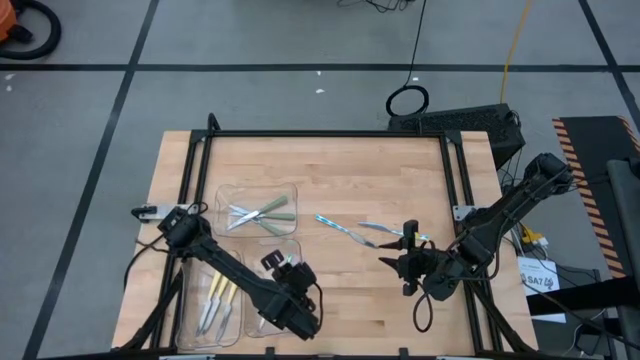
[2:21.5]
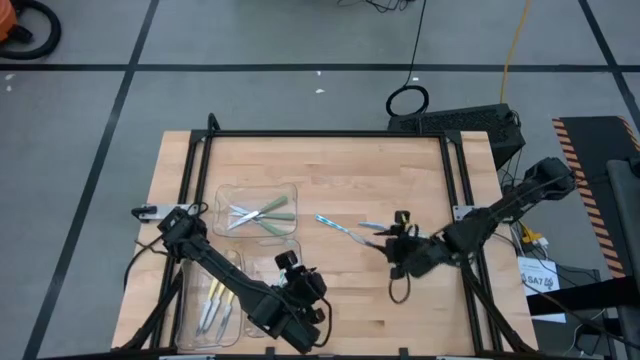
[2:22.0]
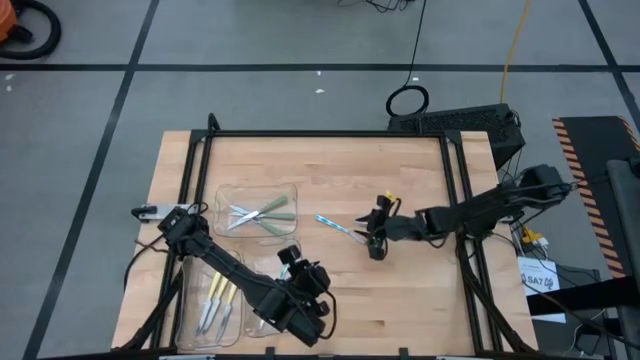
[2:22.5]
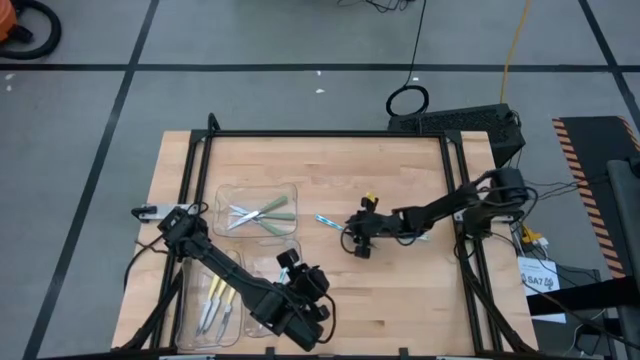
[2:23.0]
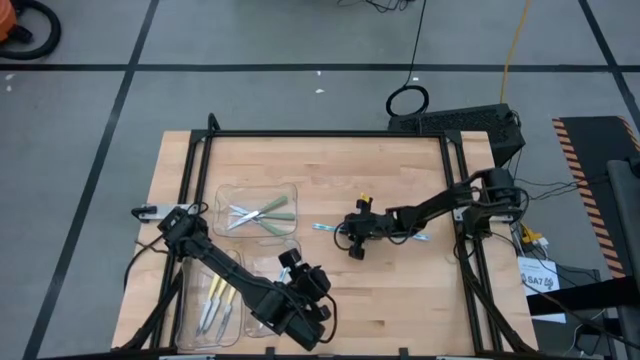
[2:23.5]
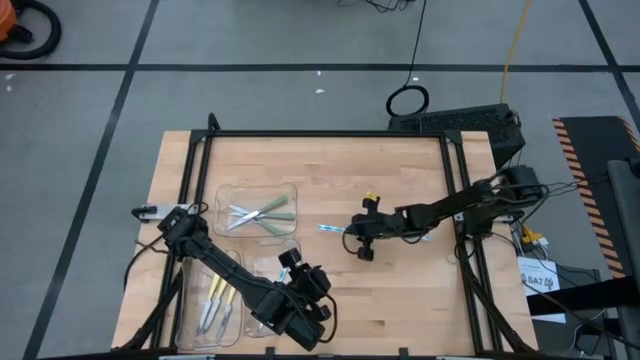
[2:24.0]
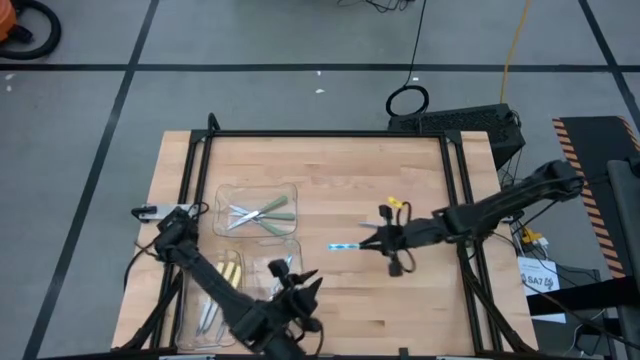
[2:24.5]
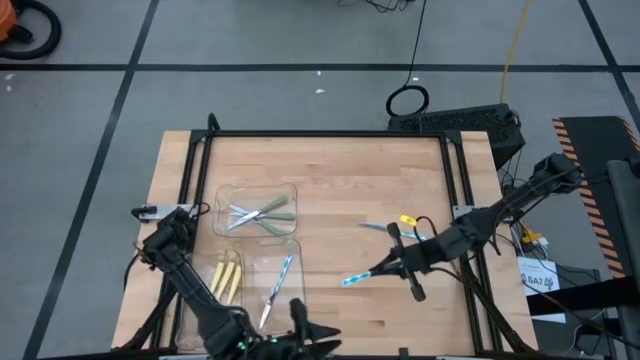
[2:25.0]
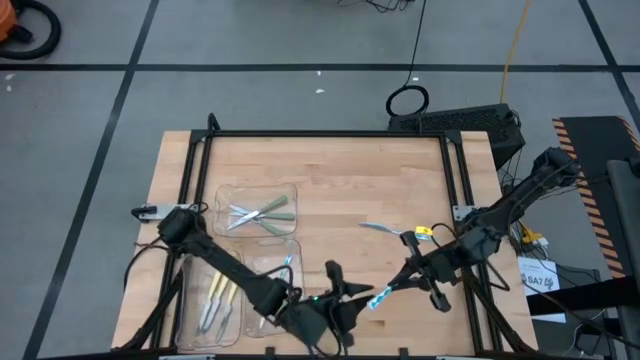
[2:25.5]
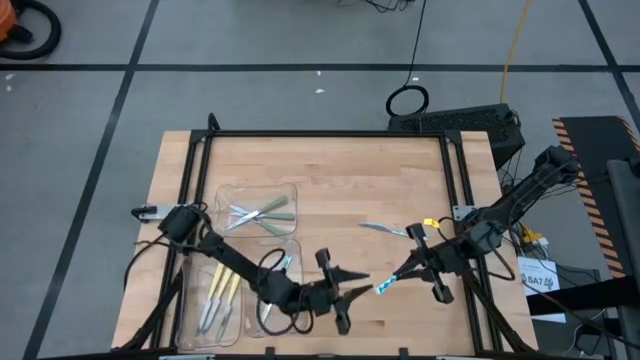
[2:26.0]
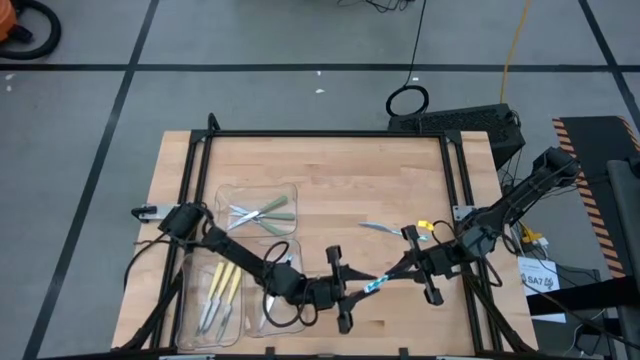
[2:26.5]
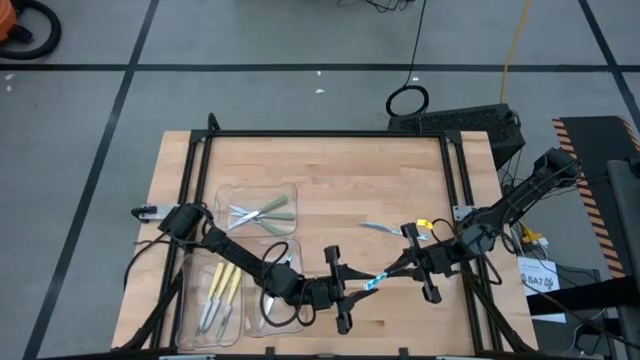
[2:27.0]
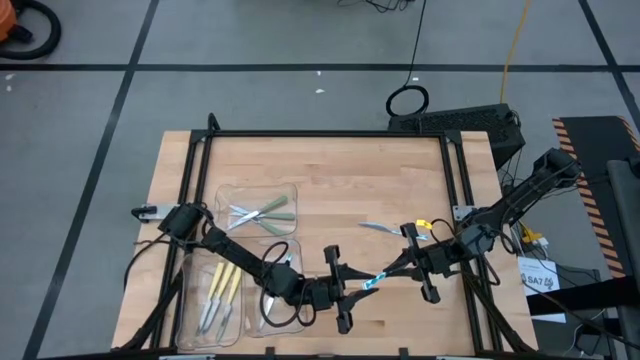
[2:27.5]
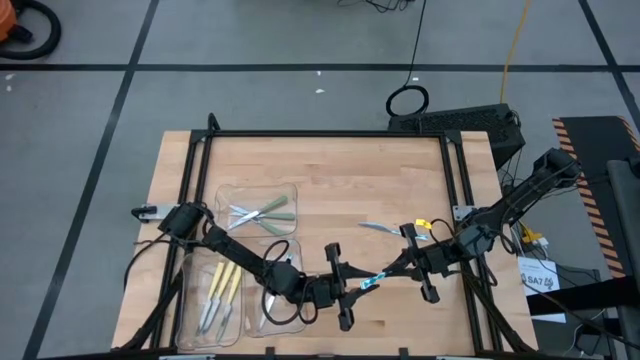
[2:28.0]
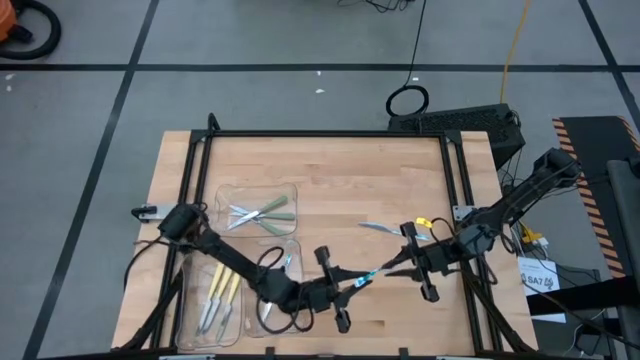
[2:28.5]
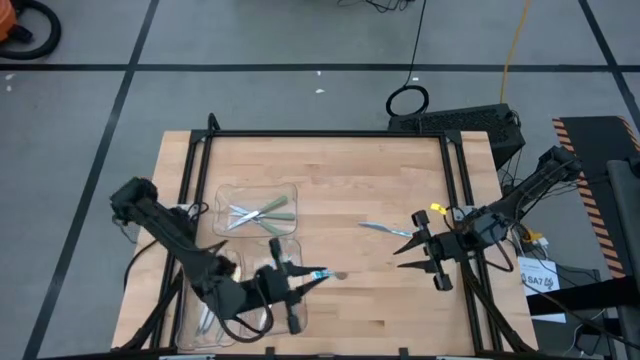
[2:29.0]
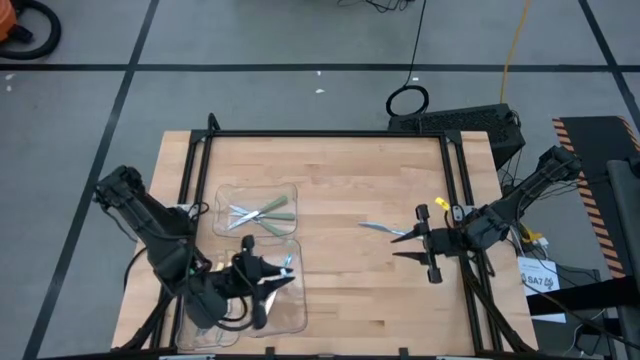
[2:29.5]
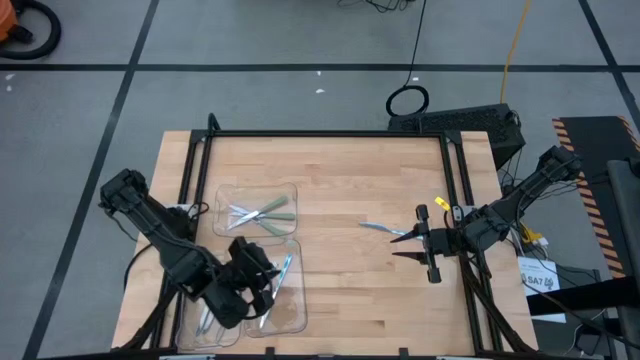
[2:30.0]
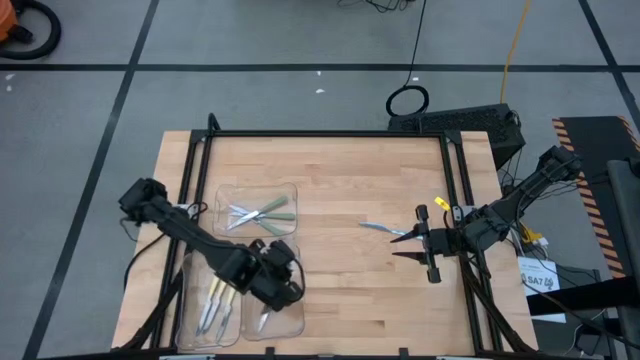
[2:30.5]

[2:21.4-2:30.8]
Task: Sort silverware by color (type)
Put the left blue table knife into the bottom right transparent bin

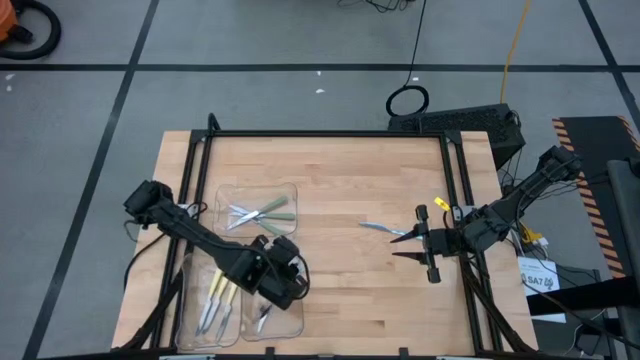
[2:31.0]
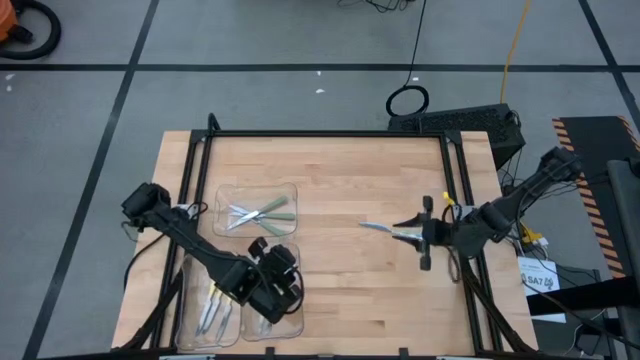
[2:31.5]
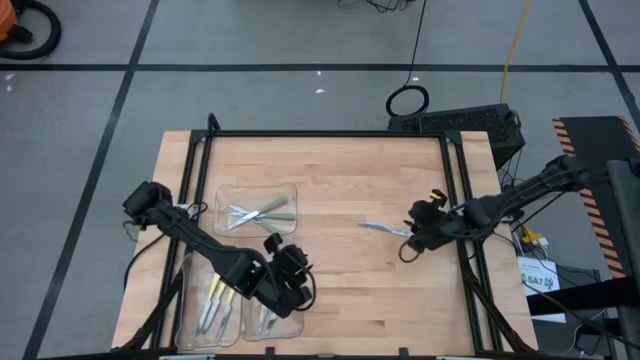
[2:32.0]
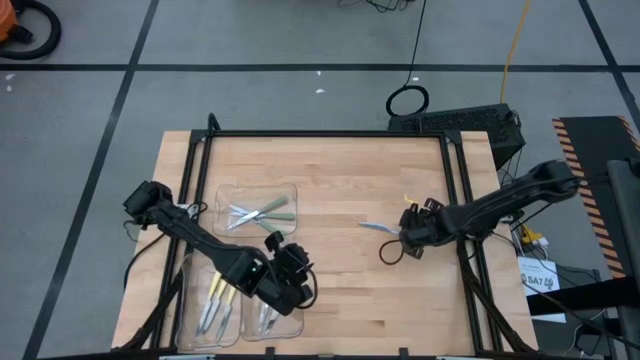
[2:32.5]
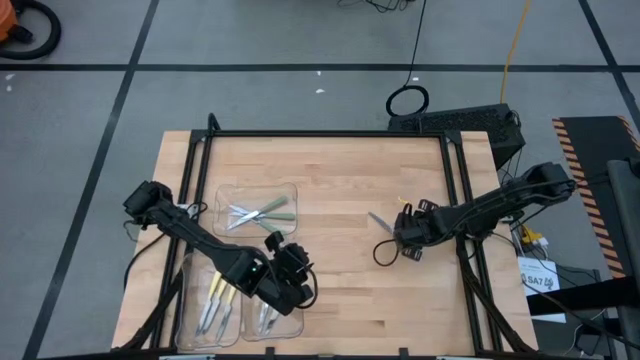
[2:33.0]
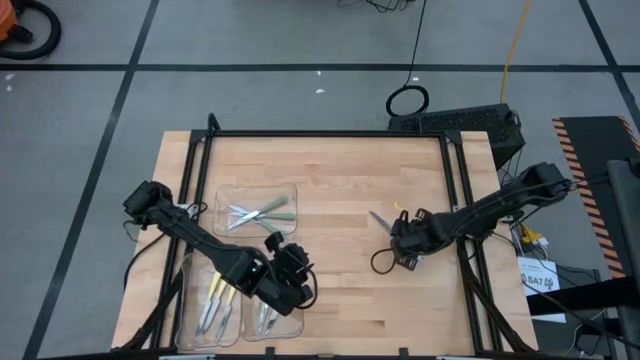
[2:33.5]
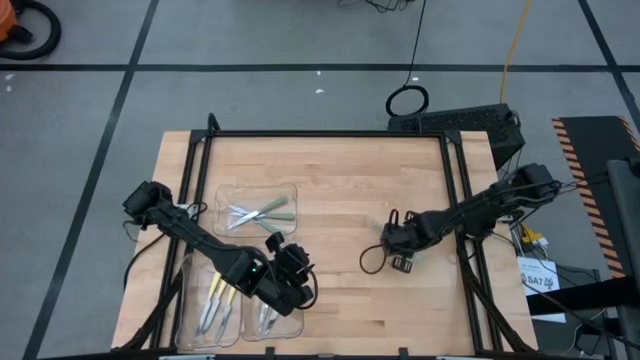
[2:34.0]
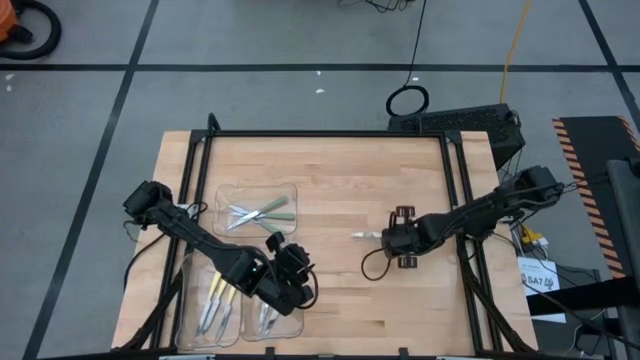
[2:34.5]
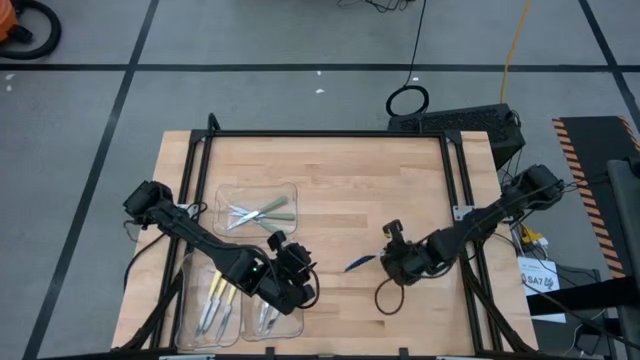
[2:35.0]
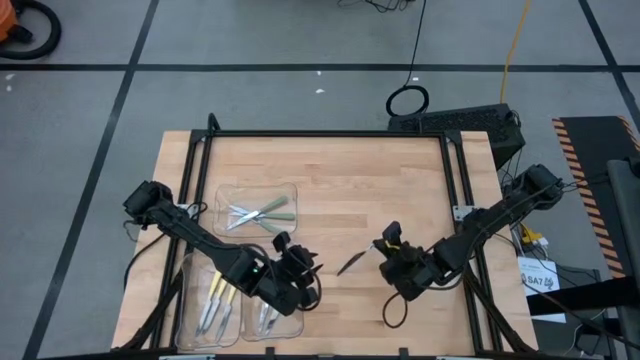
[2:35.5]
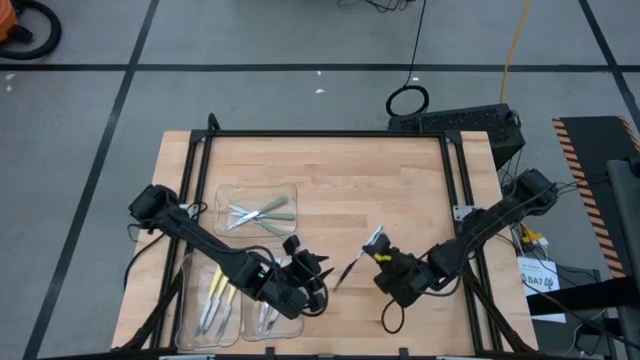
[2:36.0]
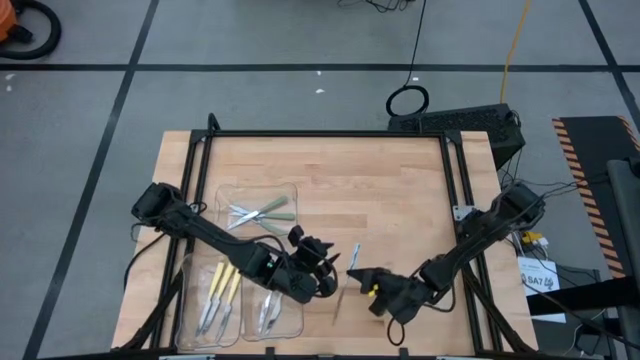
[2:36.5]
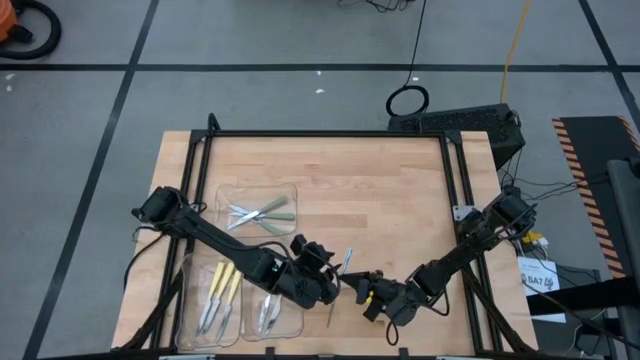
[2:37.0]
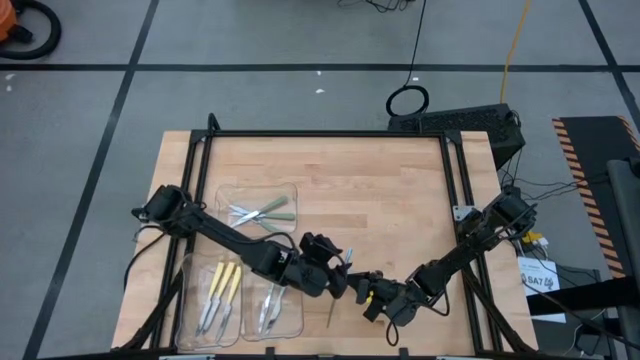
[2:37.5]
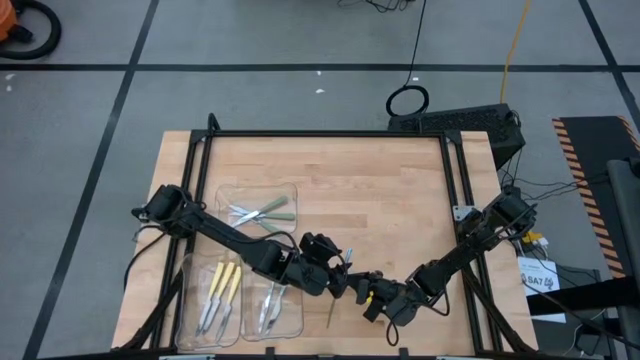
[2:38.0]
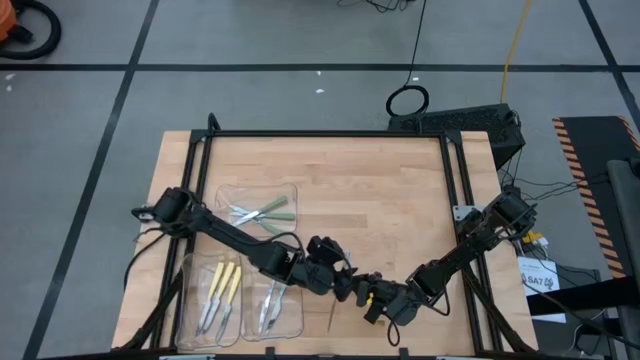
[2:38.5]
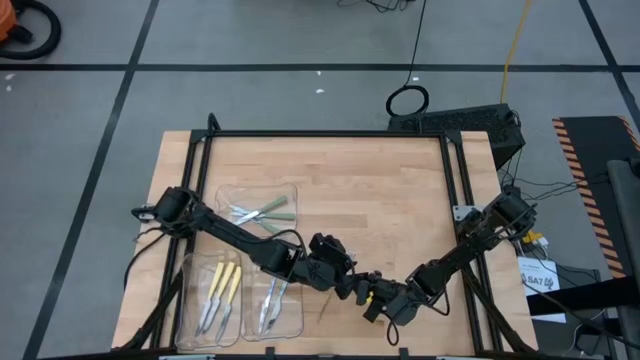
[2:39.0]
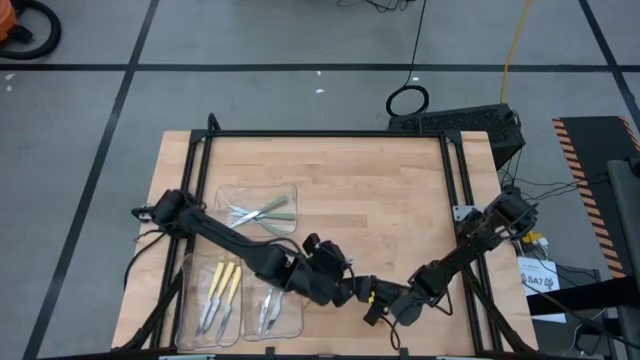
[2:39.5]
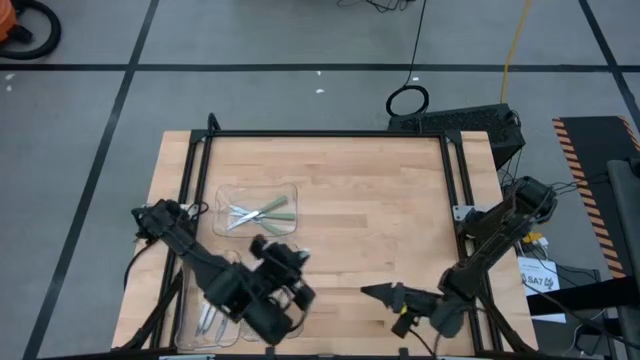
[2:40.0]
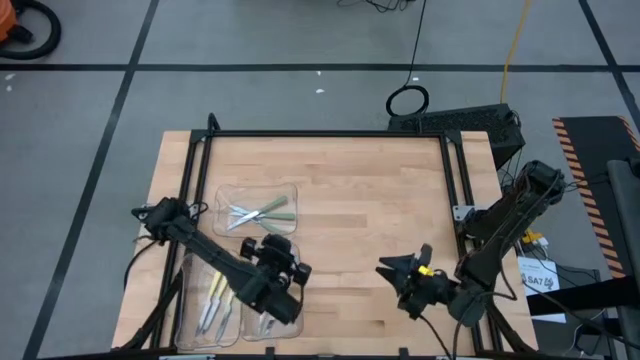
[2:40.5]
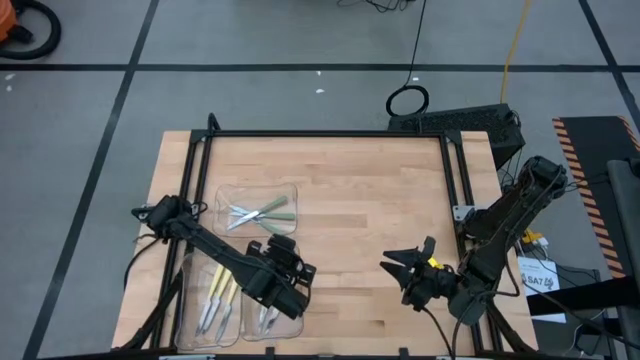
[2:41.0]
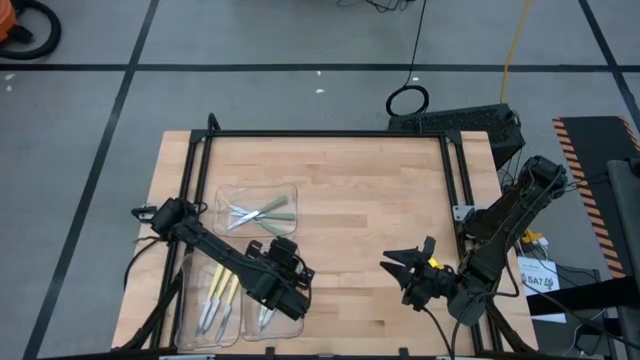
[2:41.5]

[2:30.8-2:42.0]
Put the blue table knife into the bottom right transparent bin
